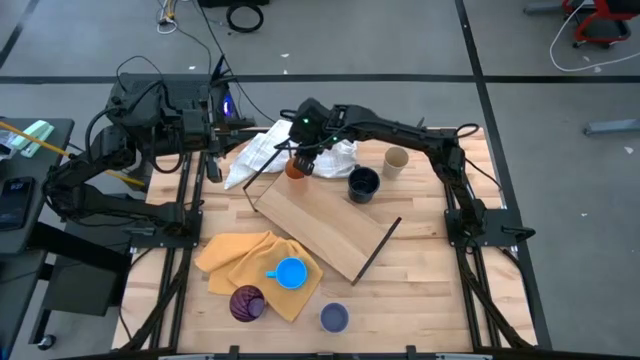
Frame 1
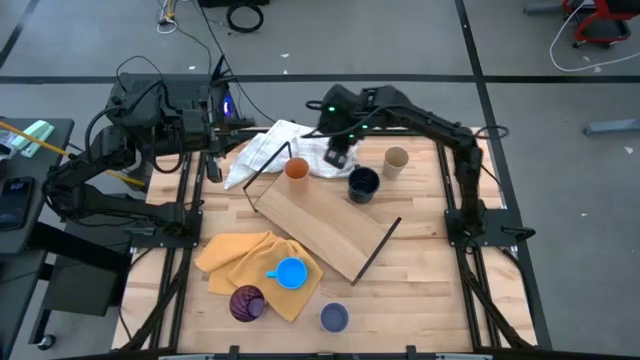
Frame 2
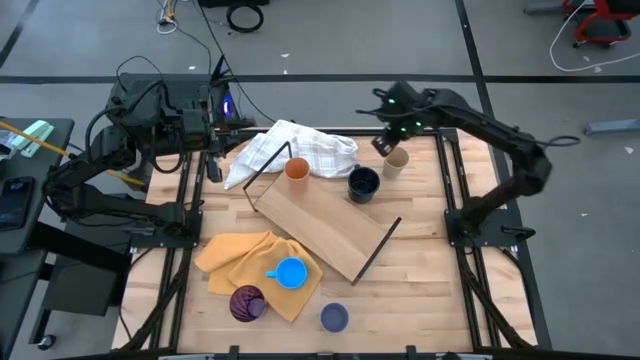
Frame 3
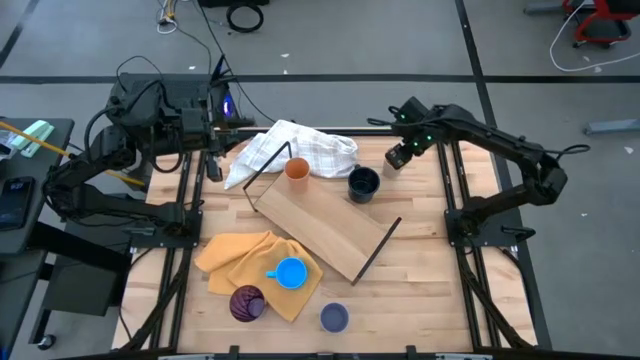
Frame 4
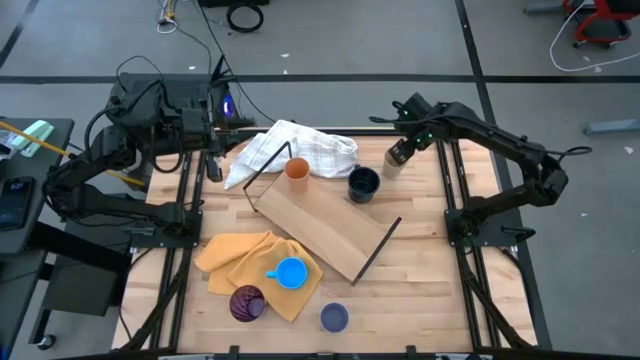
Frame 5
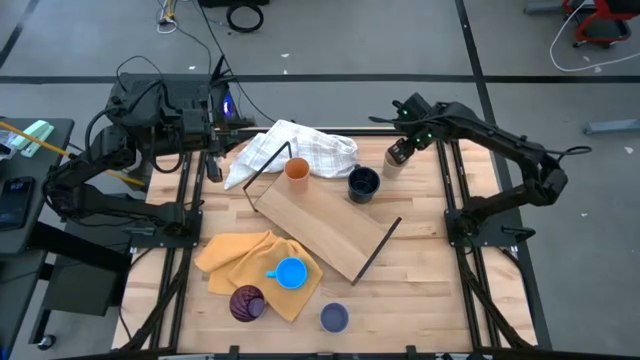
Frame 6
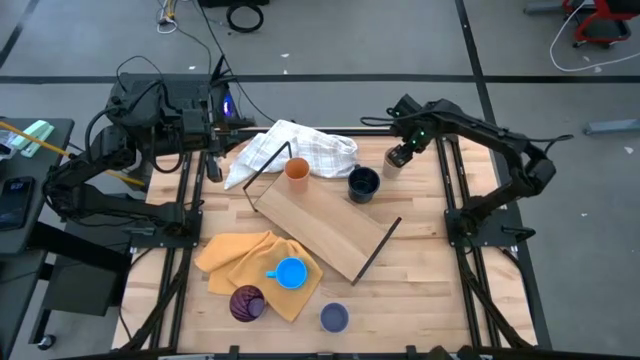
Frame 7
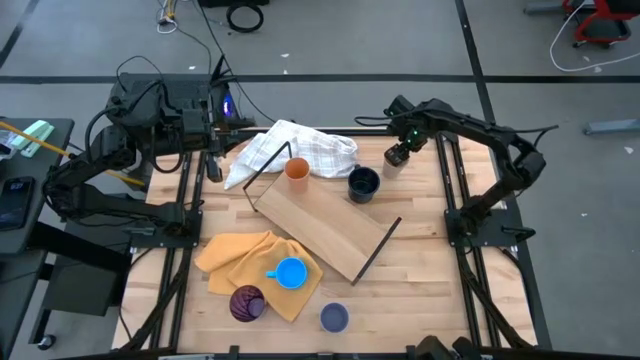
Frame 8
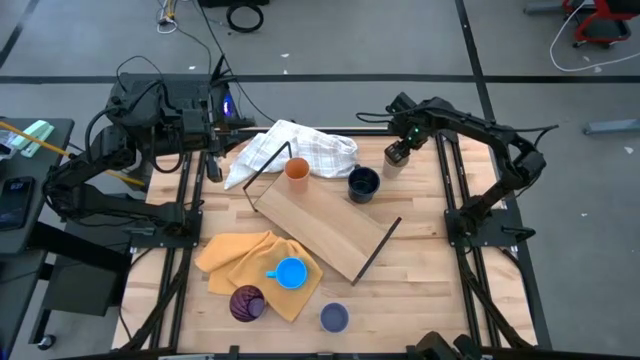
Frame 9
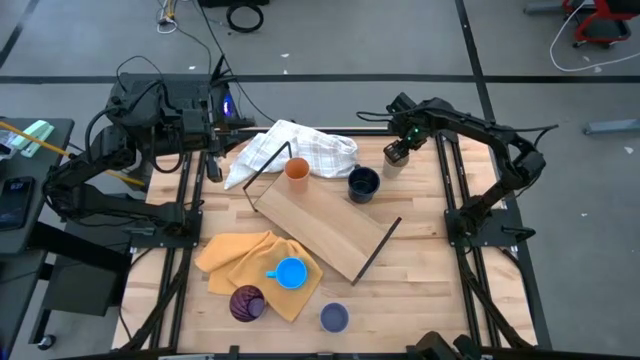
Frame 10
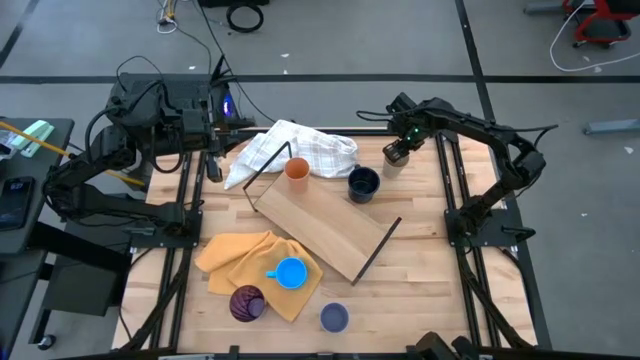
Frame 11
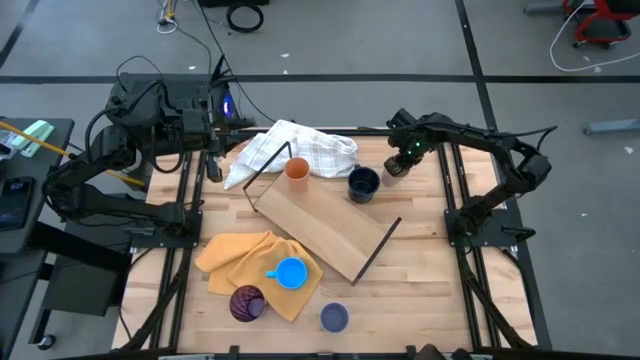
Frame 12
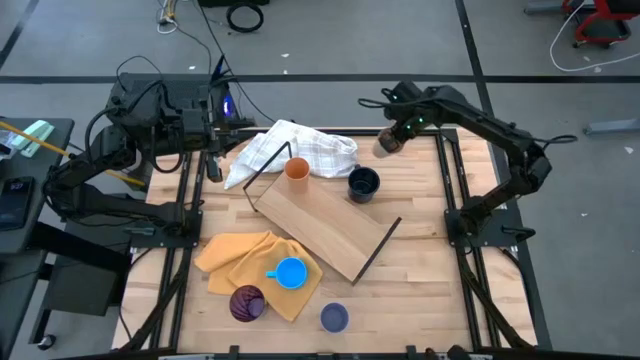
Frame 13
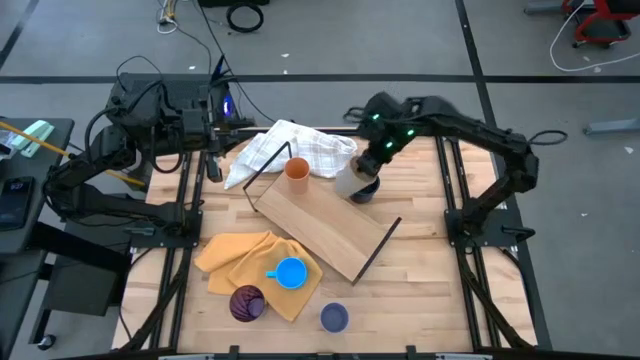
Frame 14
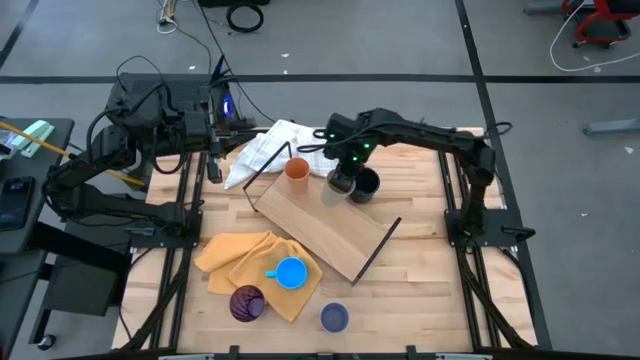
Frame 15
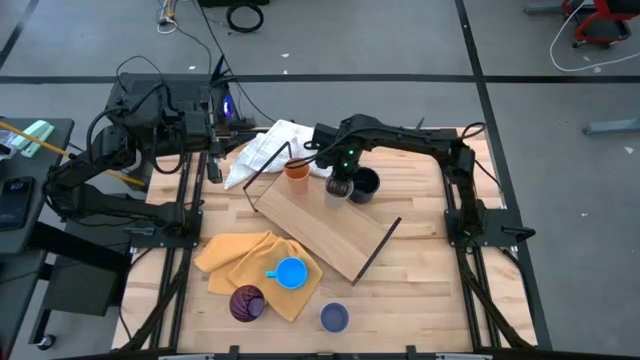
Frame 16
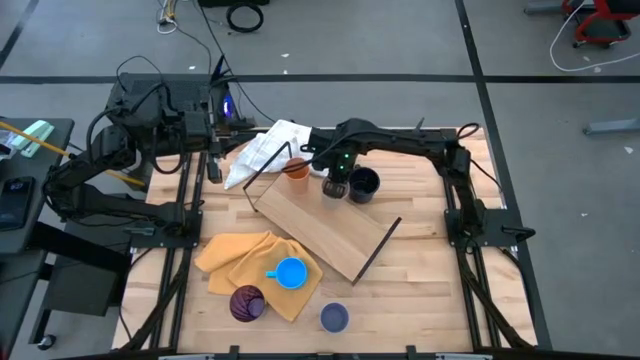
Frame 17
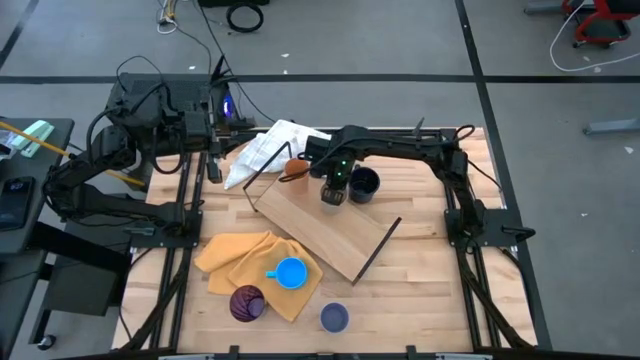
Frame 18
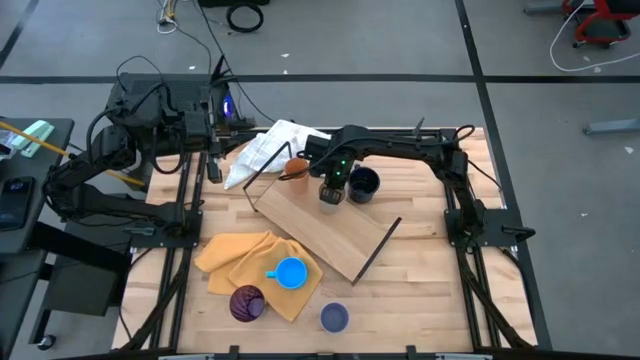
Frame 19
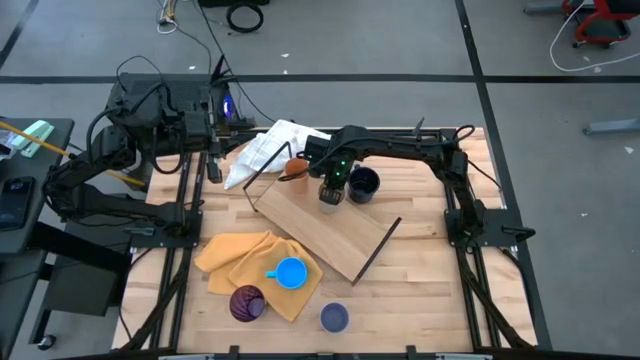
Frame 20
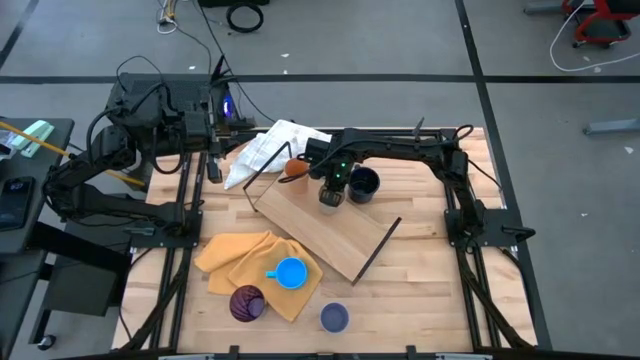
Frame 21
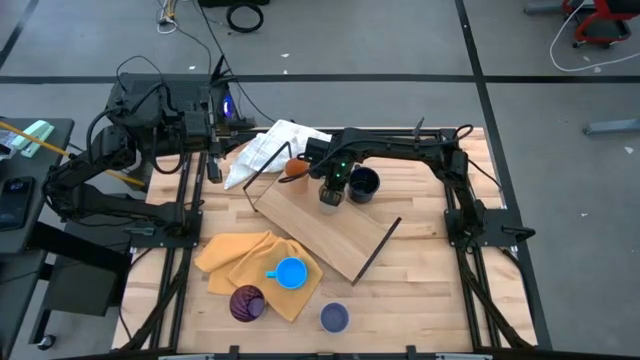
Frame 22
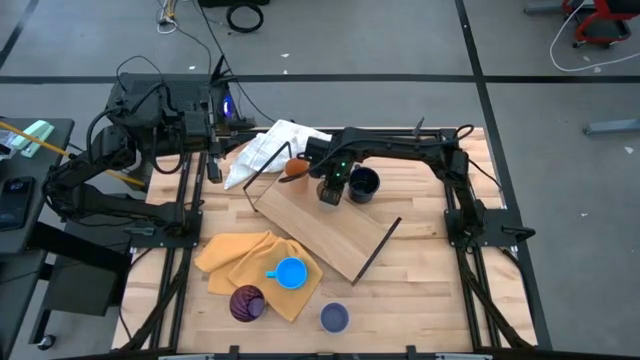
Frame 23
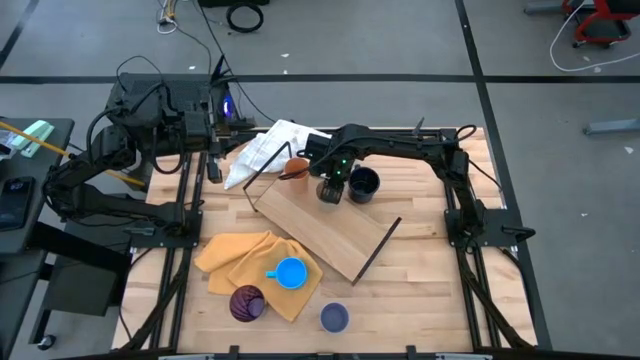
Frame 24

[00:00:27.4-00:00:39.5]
Task: Stack small to large cups/mugs on shelf
Put the white cup on the shelf

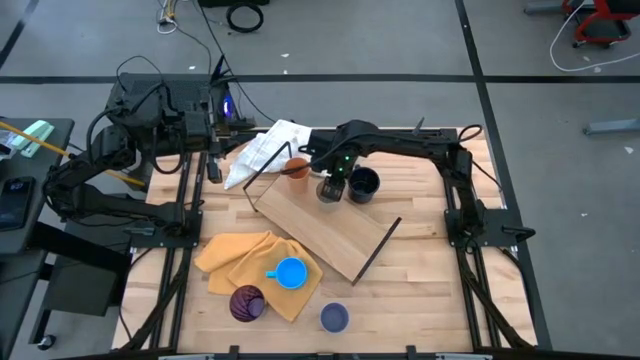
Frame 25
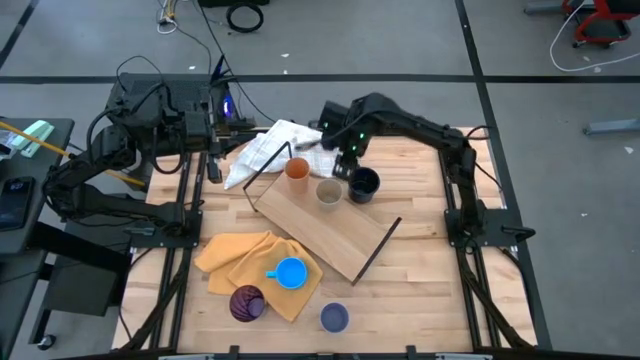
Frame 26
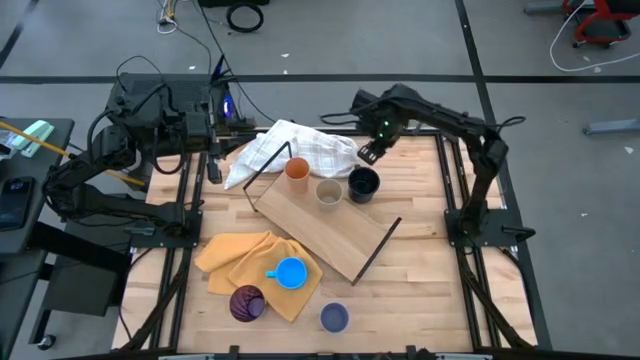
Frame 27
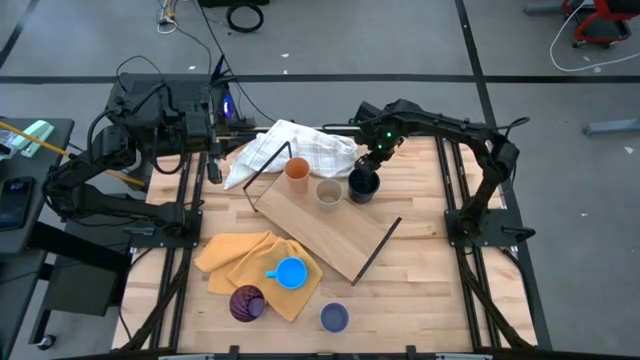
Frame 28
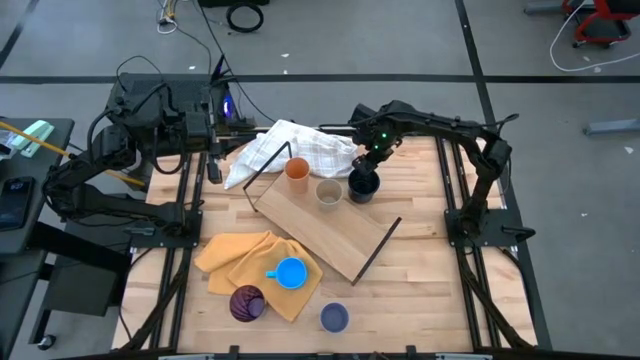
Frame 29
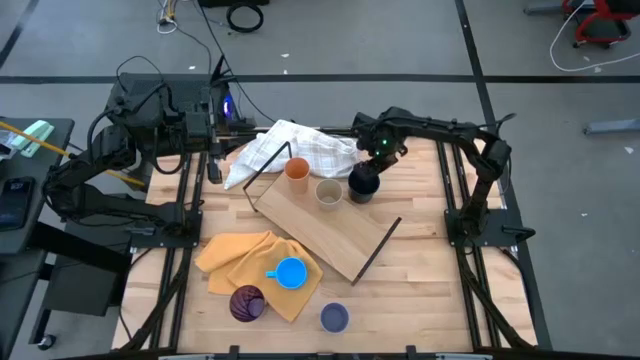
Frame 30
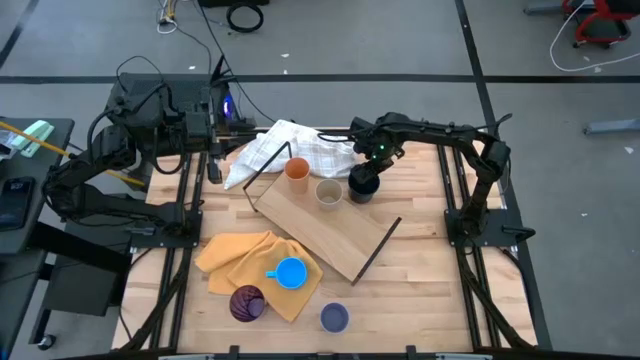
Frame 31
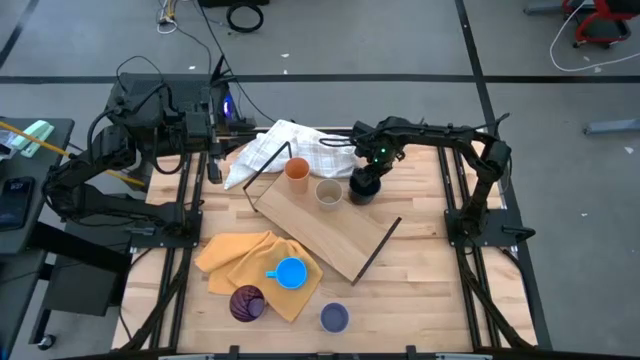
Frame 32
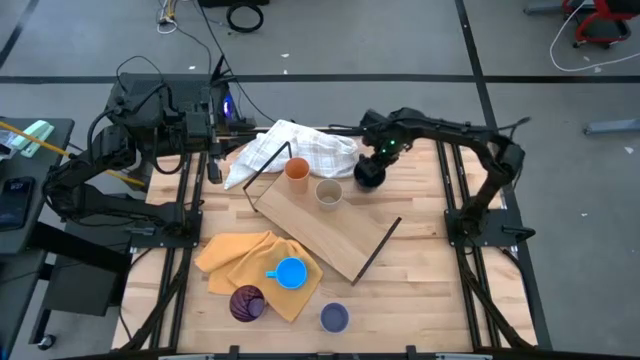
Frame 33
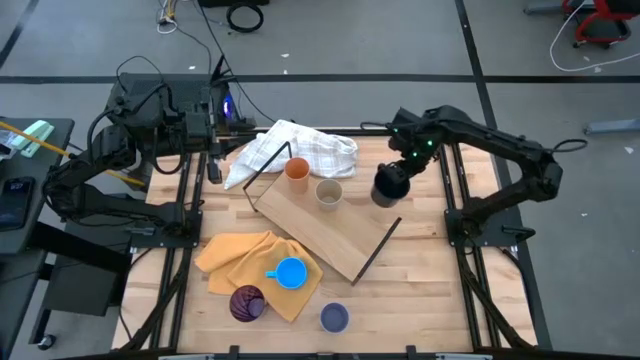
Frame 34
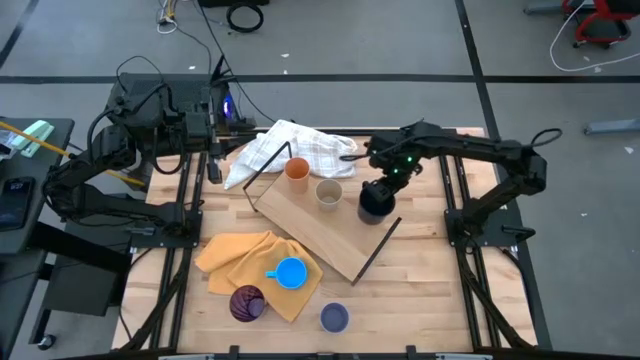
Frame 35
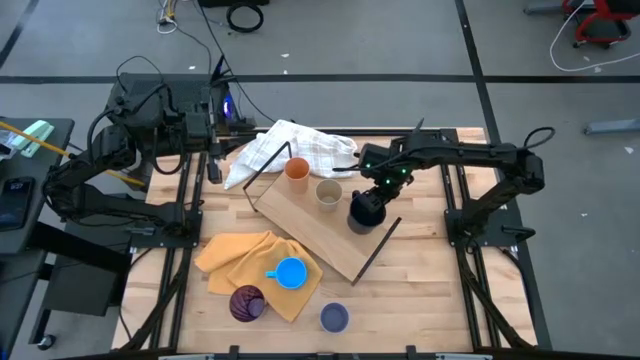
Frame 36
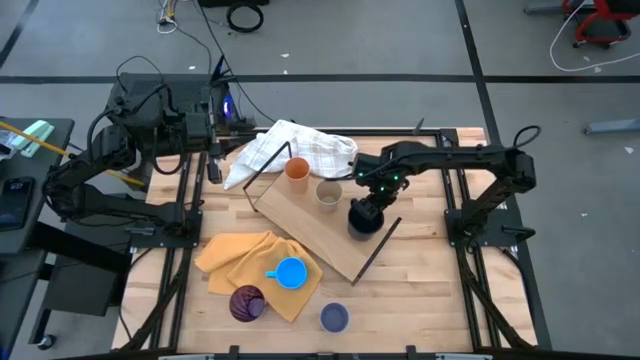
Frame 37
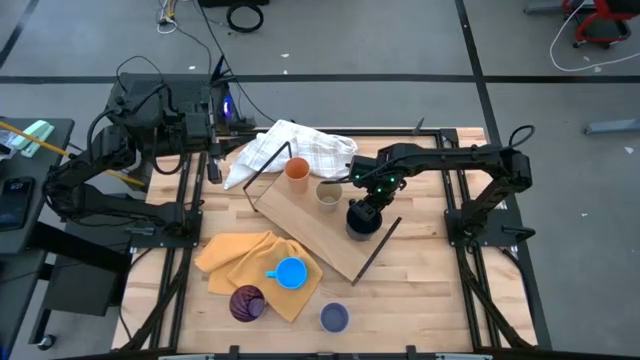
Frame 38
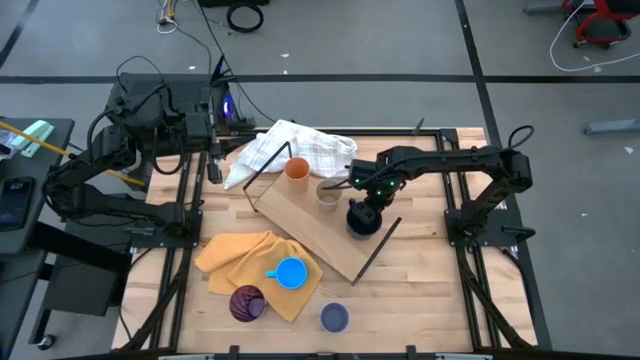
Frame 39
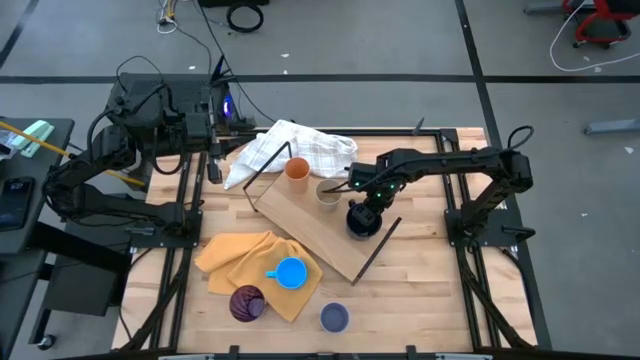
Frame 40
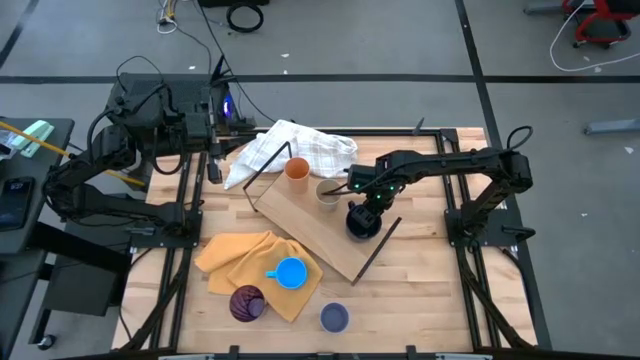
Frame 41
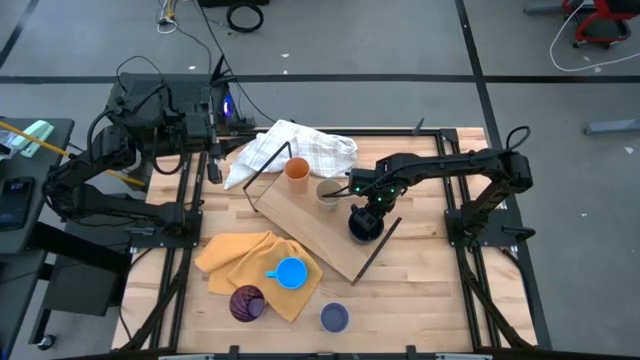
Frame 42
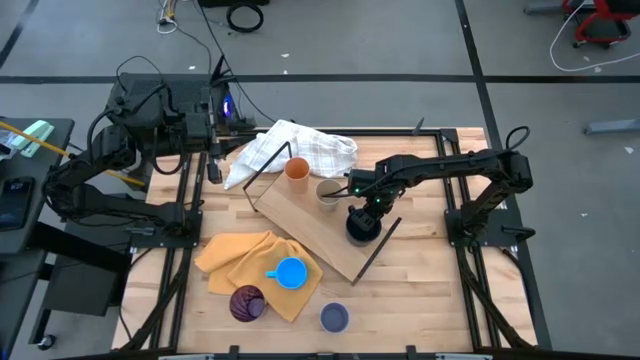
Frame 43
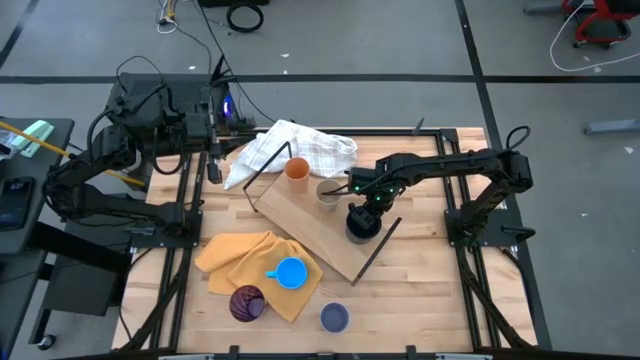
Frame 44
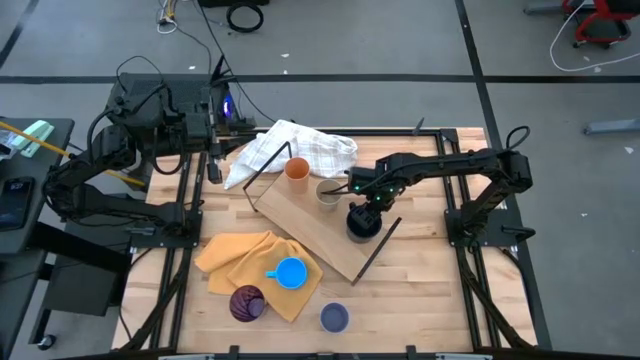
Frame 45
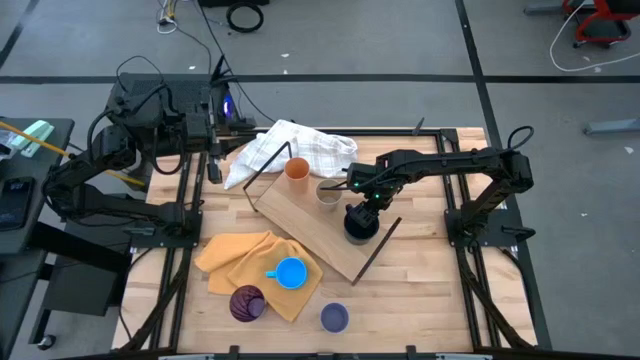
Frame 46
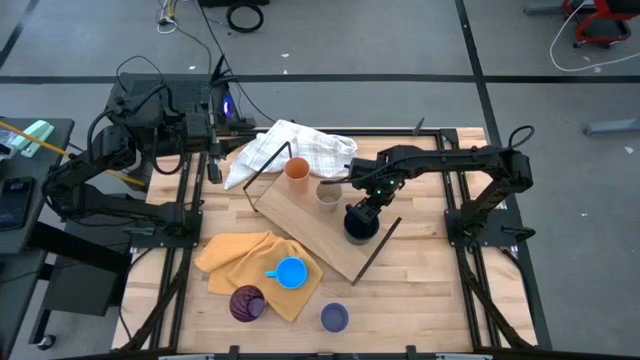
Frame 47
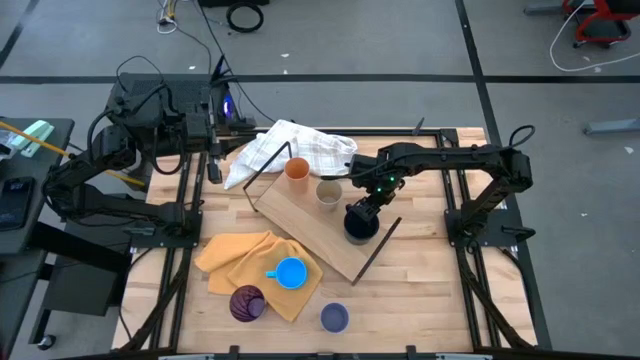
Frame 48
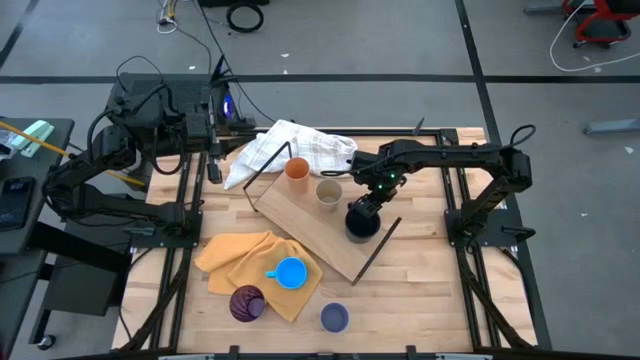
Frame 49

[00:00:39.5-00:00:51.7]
Put the dark blue mug on the shelf
